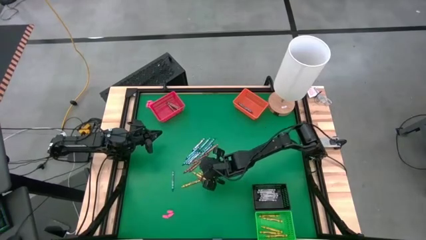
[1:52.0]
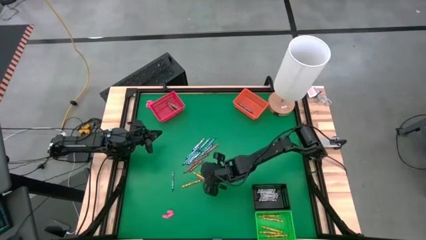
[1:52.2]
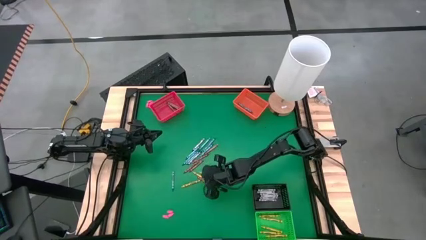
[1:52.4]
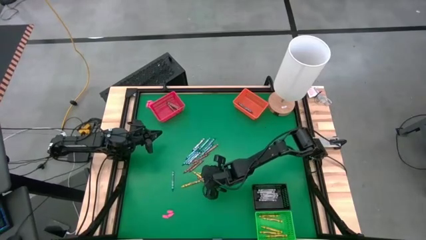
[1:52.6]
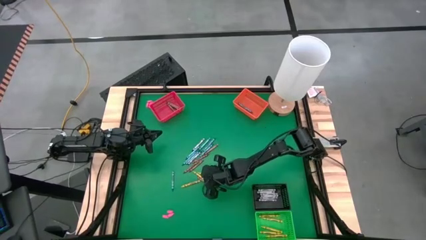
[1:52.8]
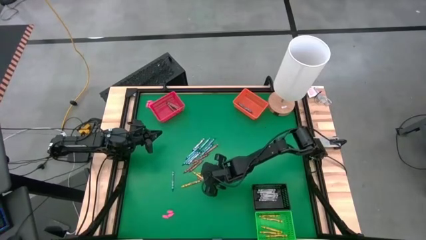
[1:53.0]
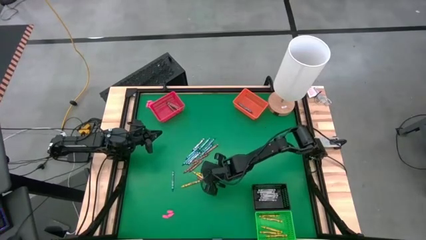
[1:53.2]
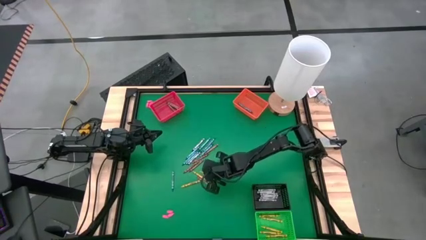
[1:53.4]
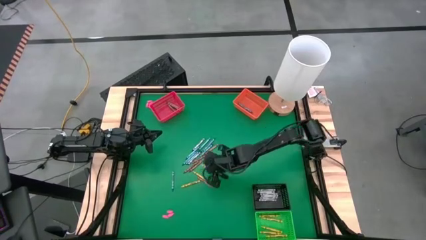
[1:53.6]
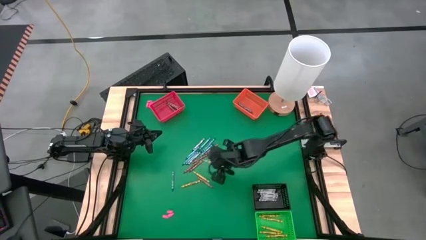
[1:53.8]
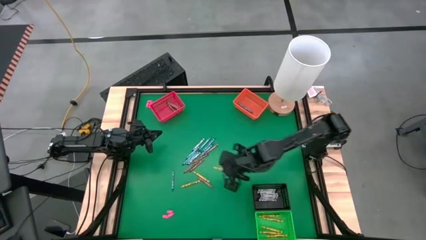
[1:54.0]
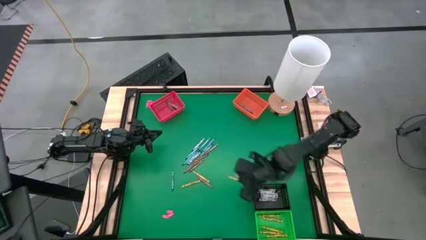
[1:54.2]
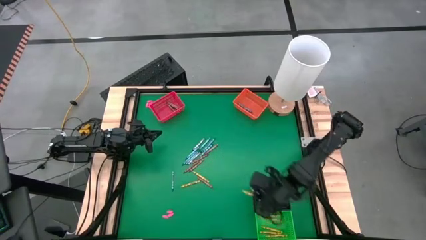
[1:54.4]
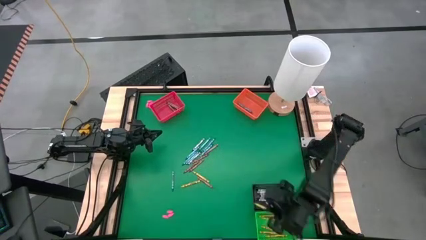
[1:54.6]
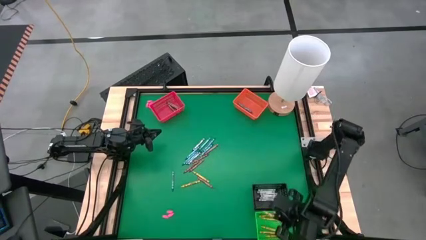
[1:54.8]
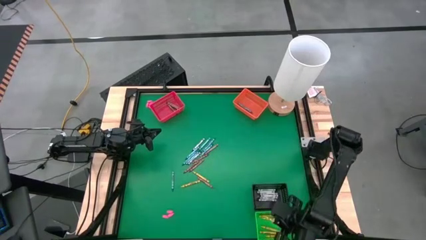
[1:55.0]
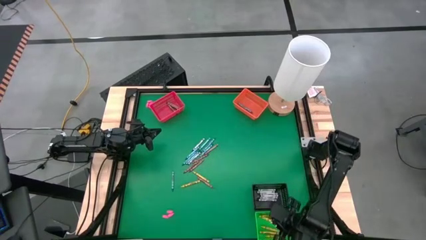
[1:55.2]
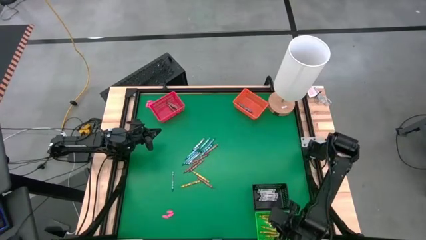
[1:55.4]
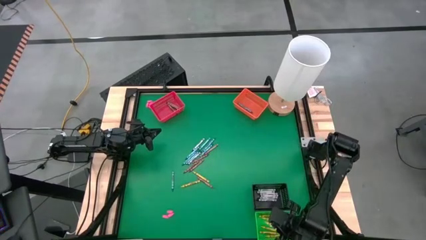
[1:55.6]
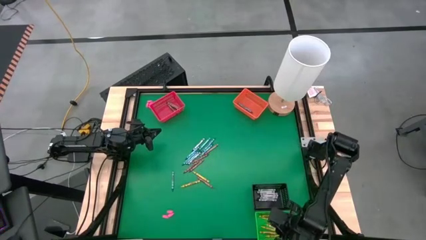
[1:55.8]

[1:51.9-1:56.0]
Task: Sort crayons
Put the yellow crayon into the green bin

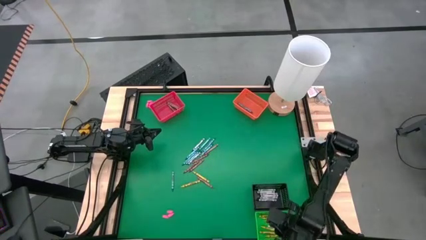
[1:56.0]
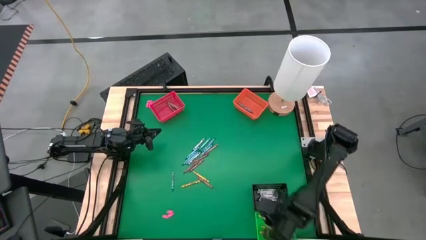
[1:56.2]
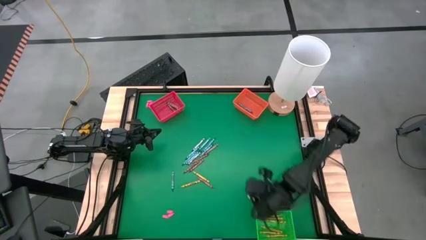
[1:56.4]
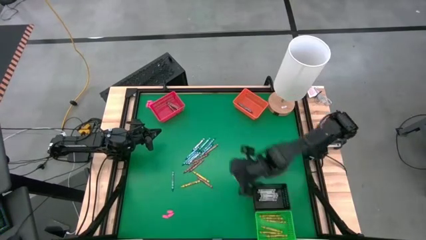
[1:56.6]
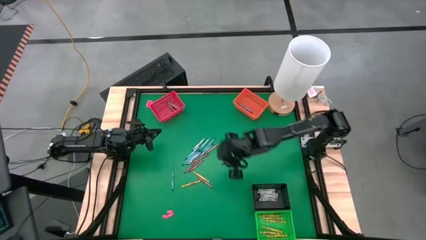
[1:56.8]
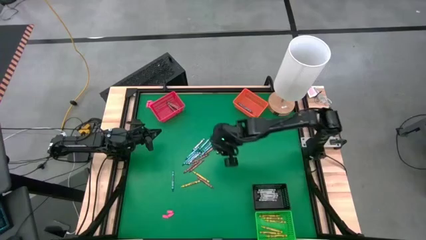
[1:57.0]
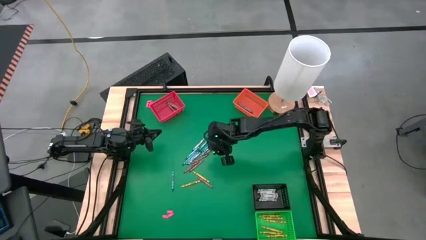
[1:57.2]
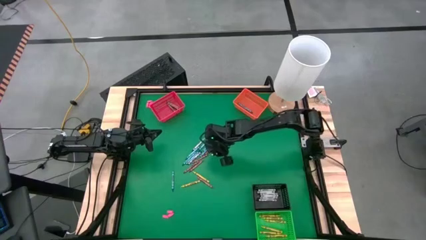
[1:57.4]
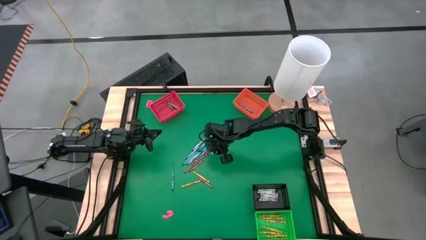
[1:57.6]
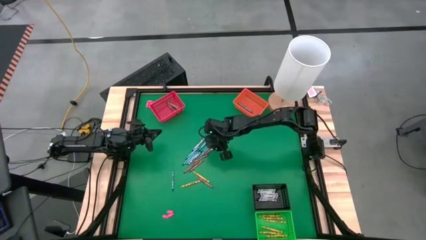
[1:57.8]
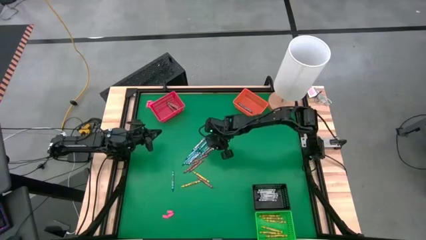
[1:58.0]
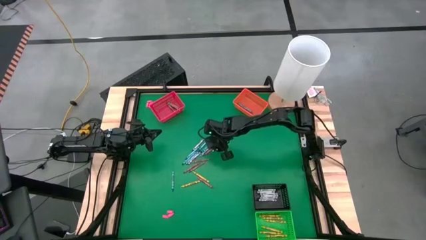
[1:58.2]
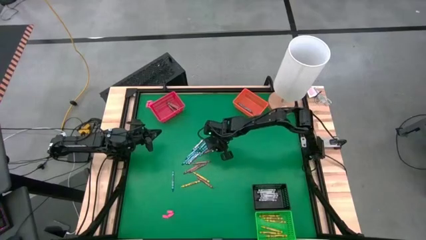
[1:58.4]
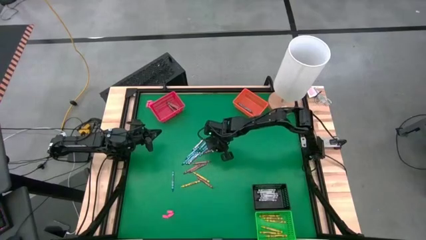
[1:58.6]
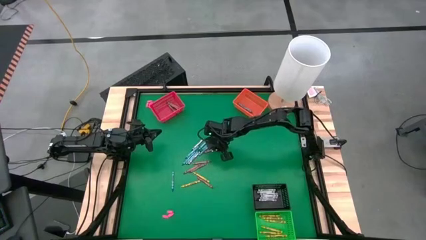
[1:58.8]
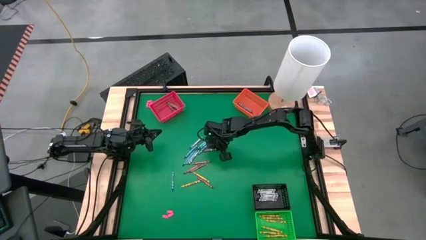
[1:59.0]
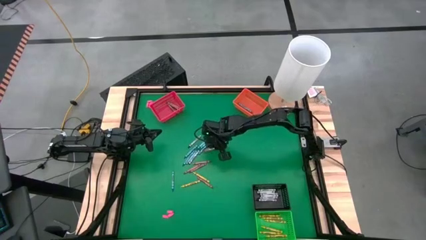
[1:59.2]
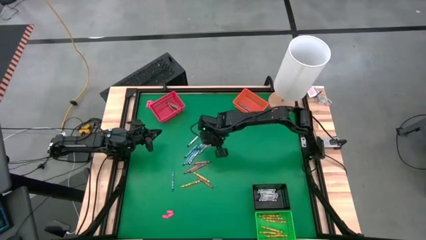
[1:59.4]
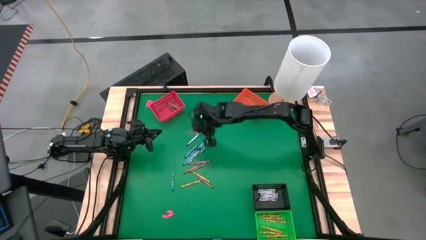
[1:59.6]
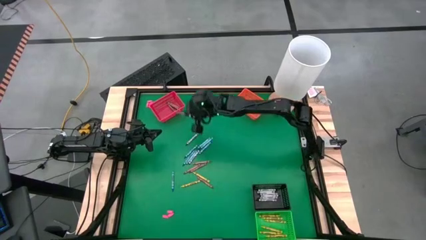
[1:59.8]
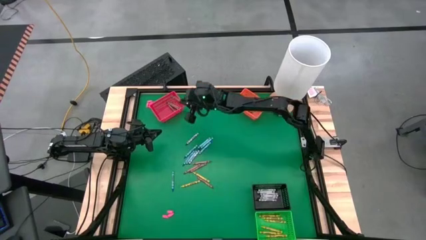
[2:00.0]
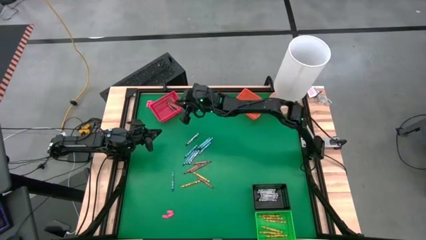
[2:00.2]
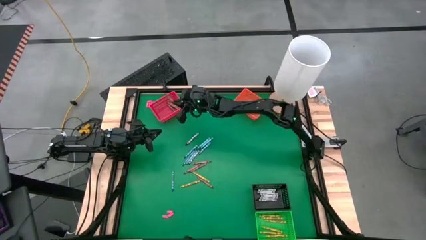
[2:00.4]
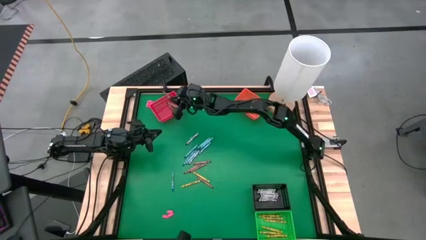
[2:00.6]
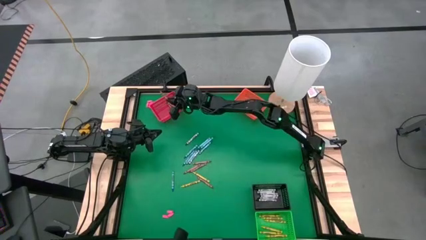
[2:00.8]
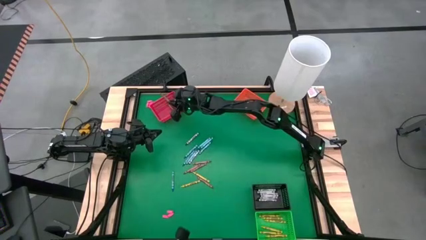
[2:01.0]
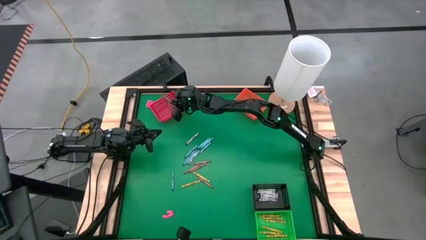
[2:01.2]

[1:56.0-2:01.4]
Put the brown crayon into the red bin

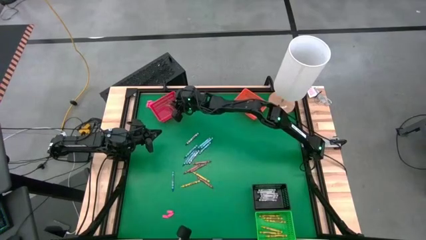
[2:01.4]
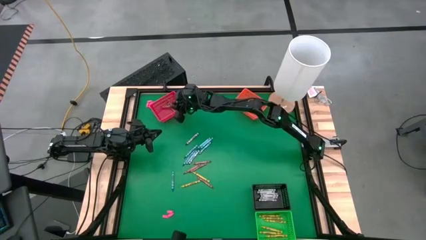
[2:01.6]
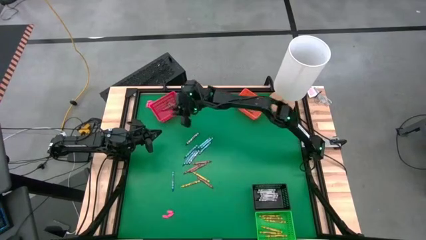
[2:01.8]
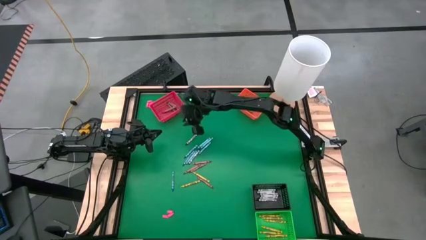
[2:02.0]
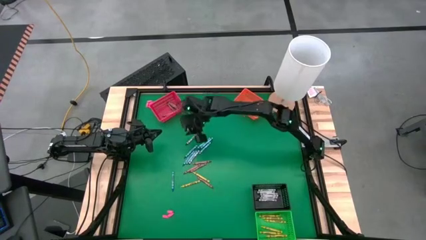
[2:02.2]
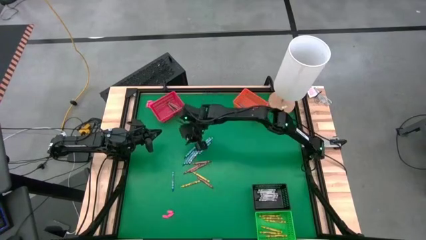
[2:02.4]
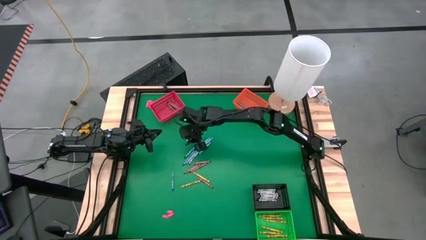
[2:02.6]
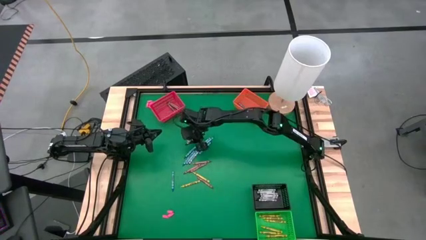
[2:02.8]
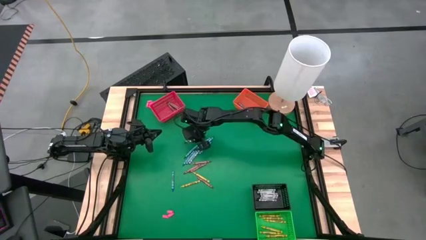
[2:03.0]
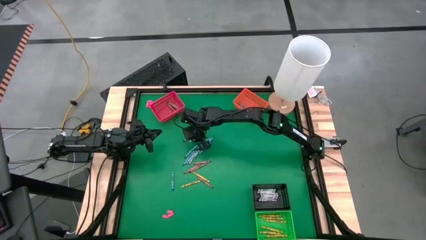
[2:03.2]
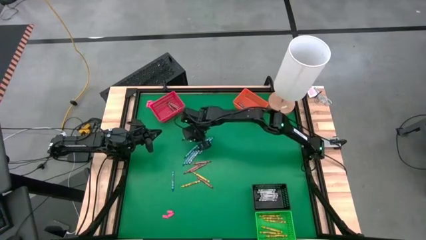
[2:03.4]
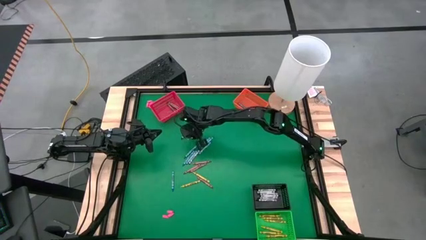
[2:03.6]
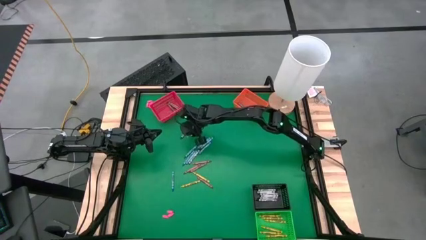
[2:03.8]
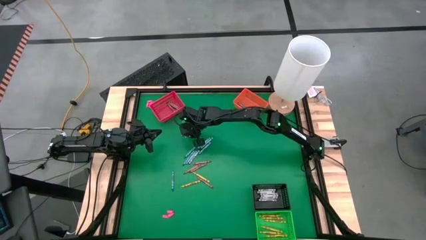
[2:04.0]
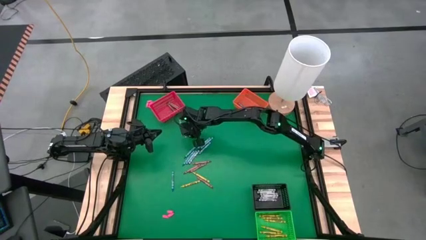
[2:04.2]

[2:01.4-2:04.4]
Put the black crayon into the black bin

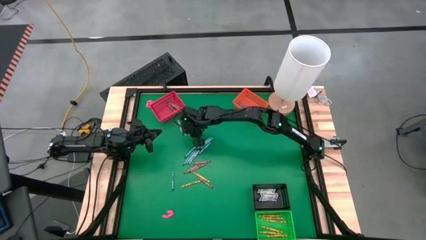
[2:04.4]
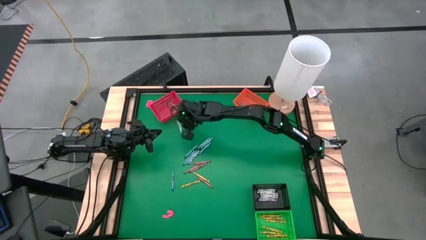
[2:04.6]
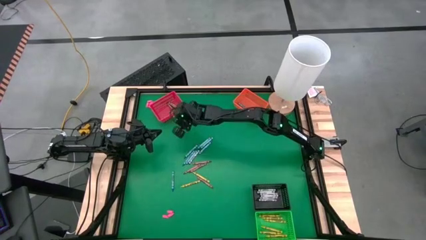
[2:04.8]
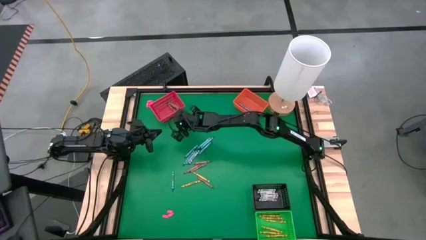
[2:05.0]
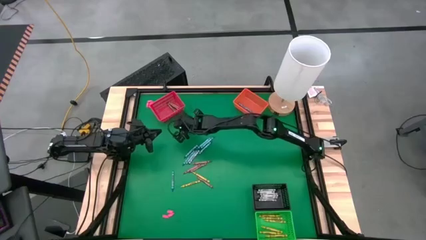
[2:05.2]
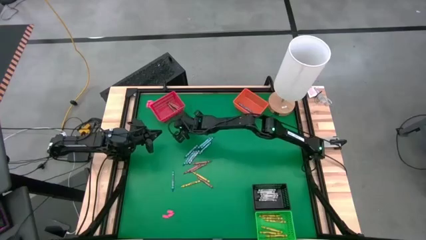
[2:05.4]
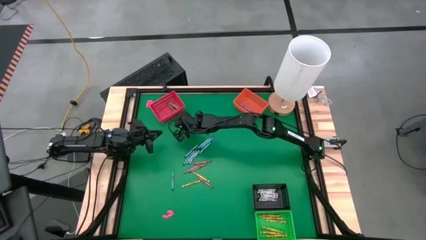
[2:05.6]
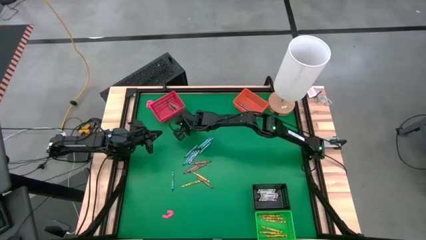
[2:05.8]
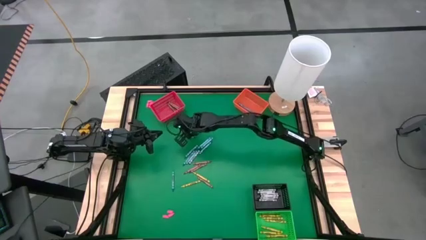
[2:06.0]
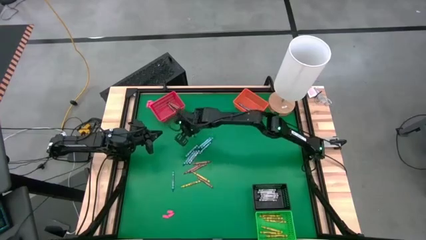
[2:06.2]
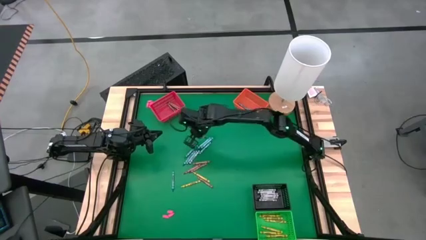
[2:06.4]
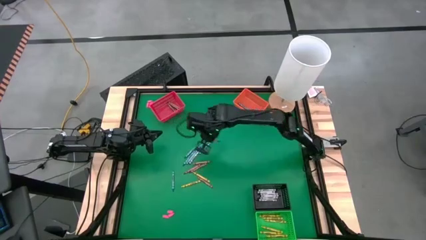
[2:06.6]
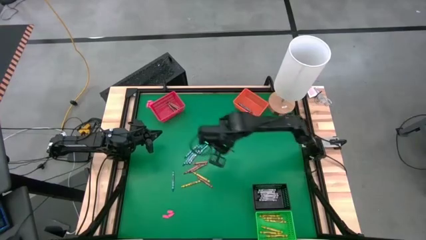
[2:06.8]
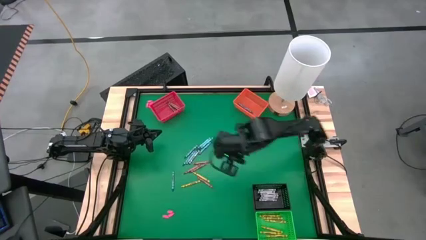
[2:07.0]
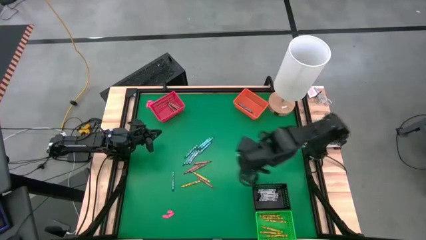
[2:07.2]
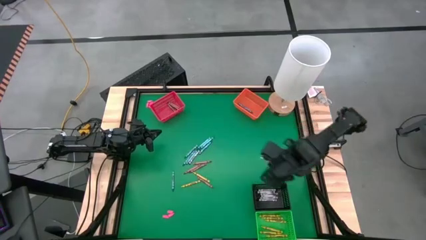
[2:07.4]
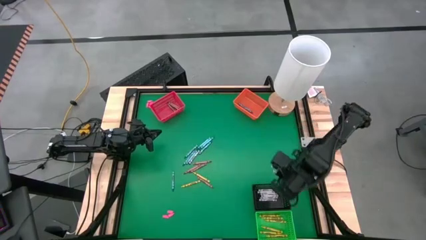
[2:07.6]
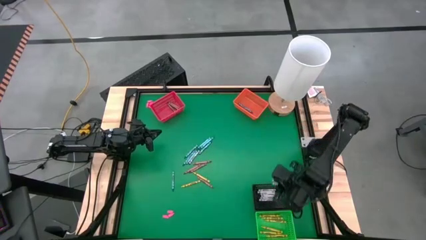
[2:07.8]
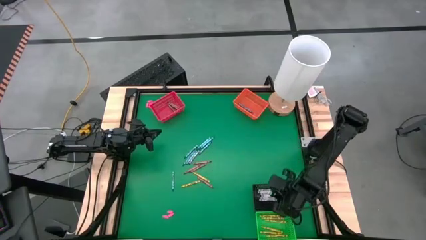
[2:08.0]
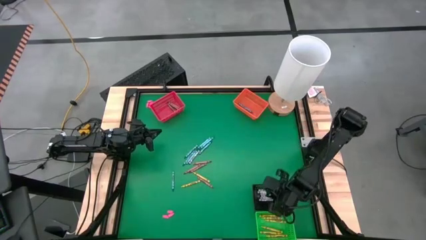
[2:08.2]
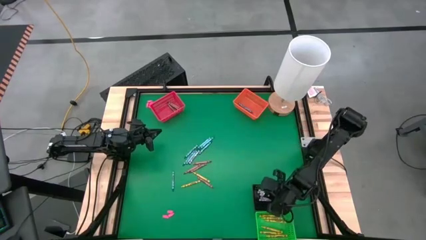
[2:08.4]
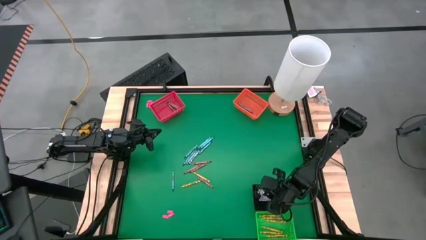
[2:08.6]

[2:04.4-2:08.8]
Put the black crayon into the black bin
